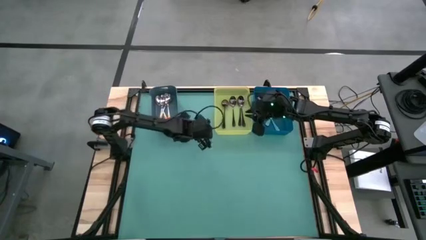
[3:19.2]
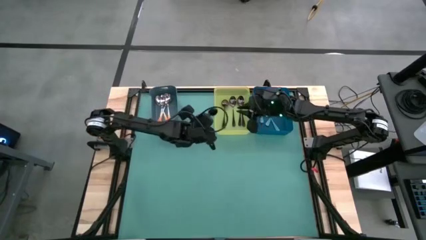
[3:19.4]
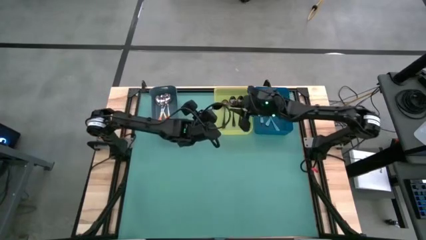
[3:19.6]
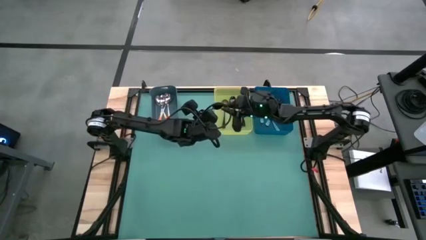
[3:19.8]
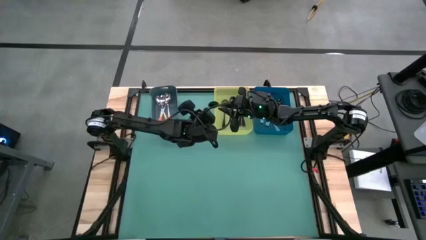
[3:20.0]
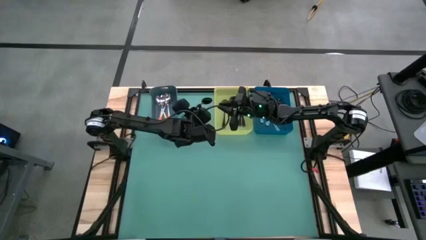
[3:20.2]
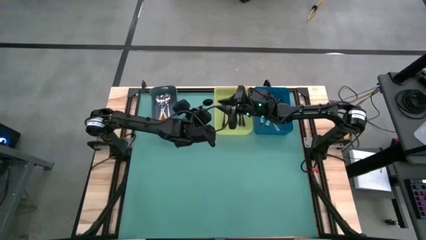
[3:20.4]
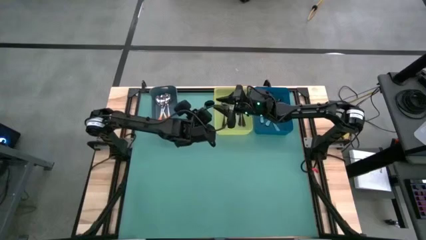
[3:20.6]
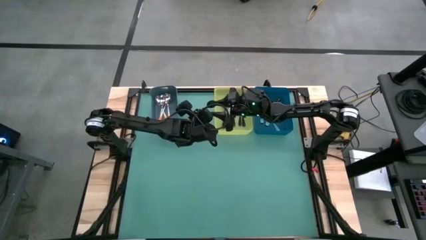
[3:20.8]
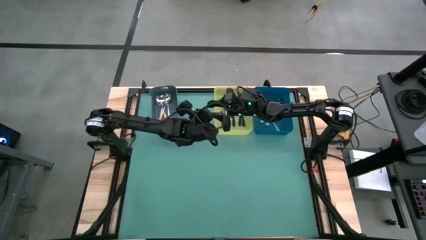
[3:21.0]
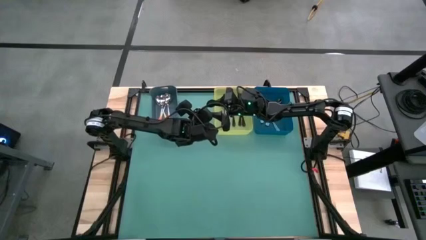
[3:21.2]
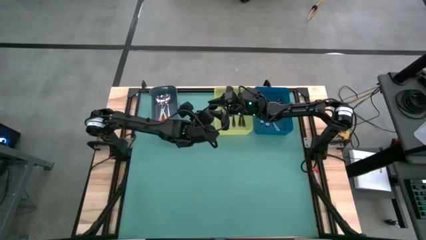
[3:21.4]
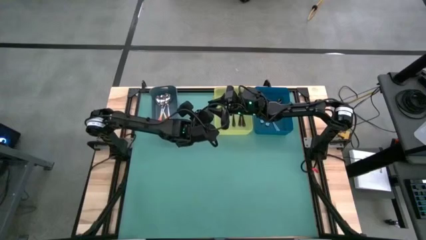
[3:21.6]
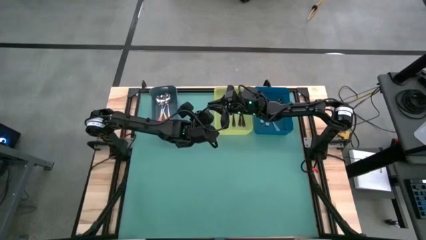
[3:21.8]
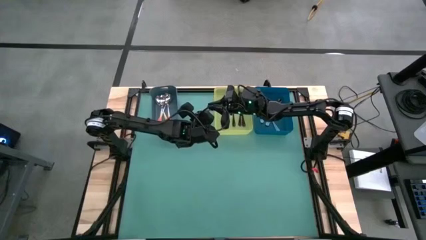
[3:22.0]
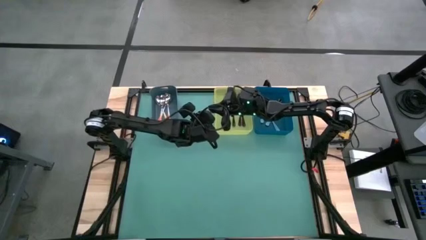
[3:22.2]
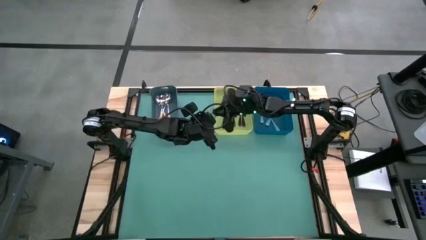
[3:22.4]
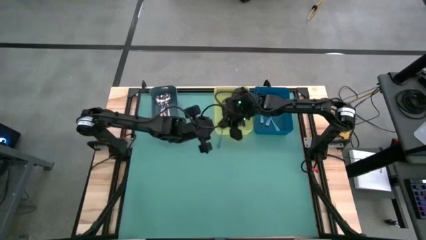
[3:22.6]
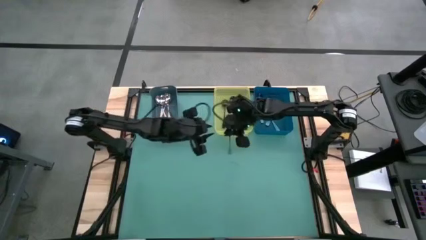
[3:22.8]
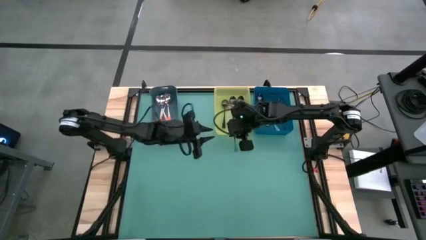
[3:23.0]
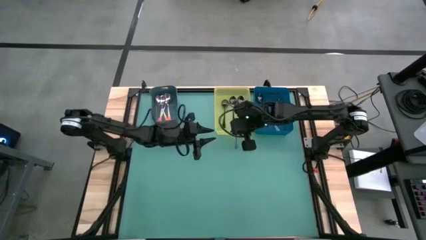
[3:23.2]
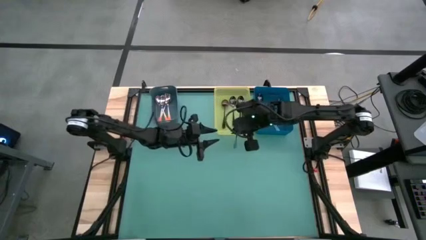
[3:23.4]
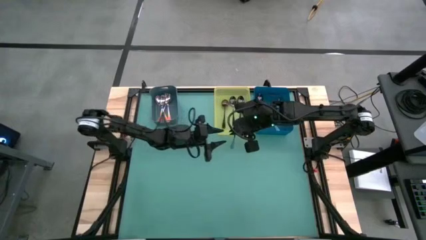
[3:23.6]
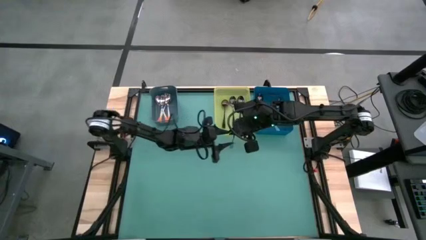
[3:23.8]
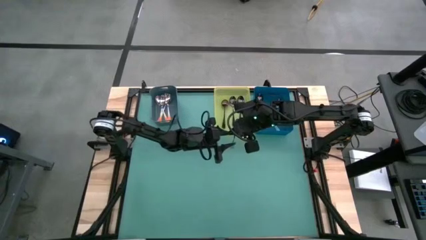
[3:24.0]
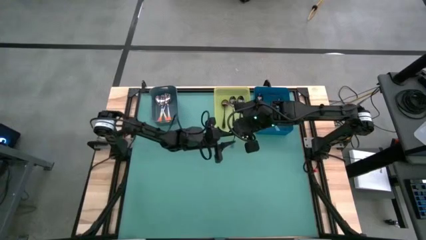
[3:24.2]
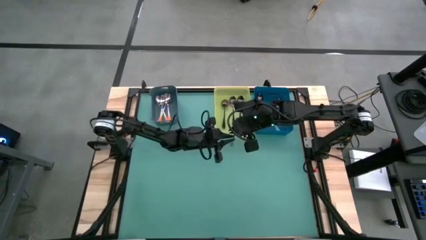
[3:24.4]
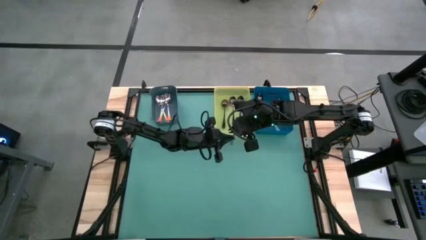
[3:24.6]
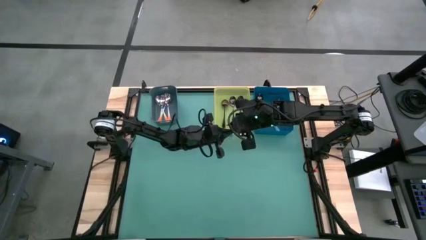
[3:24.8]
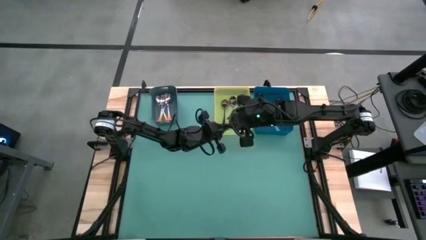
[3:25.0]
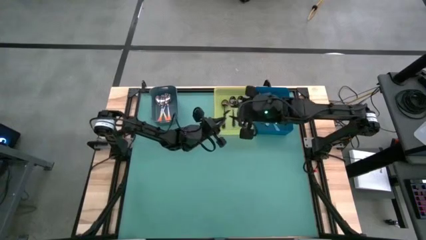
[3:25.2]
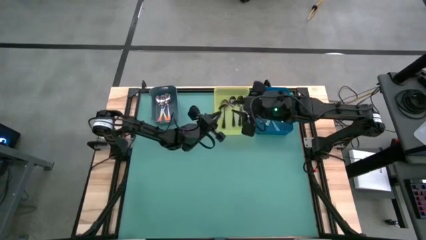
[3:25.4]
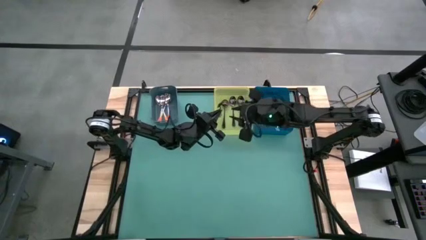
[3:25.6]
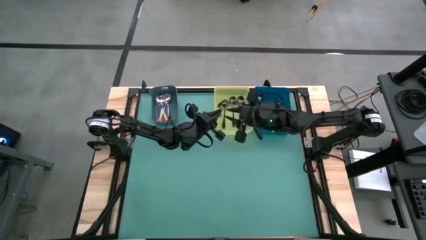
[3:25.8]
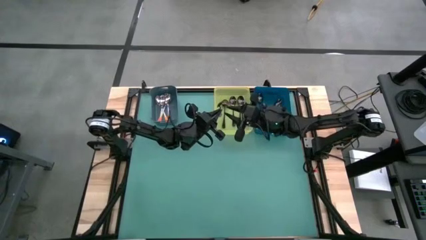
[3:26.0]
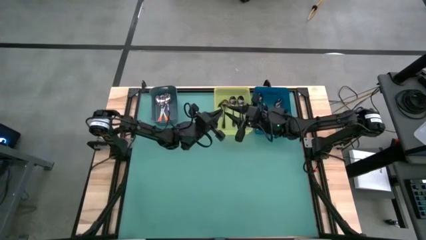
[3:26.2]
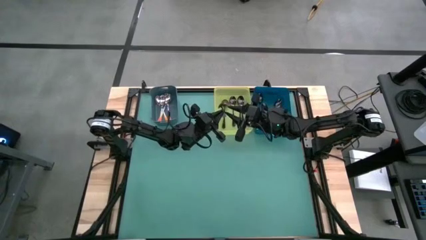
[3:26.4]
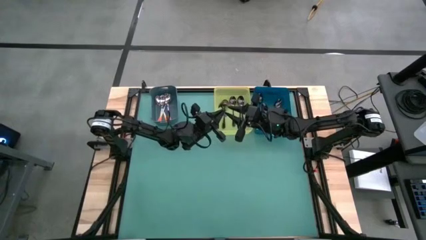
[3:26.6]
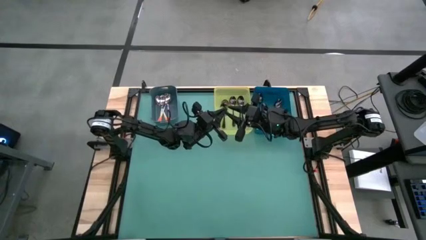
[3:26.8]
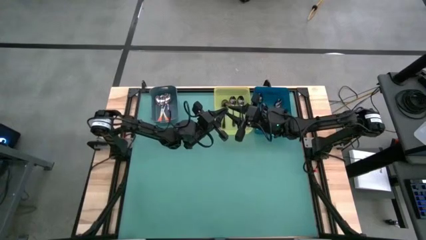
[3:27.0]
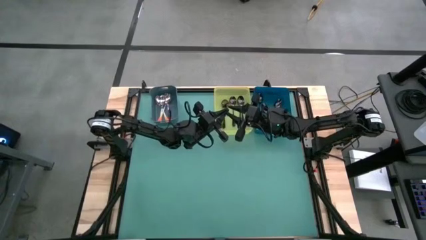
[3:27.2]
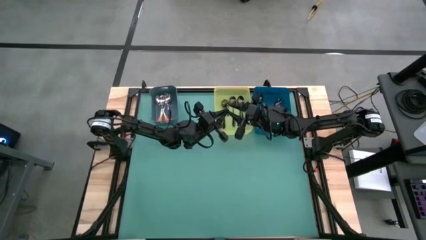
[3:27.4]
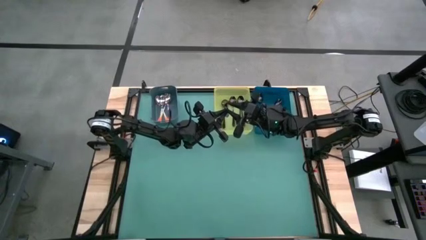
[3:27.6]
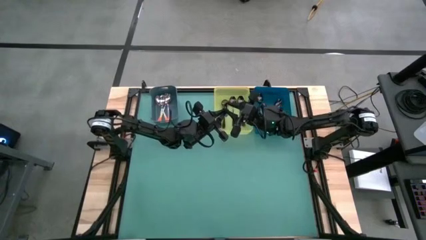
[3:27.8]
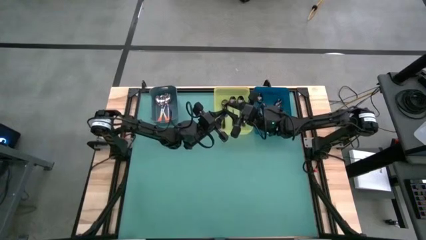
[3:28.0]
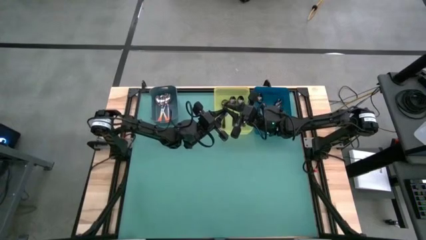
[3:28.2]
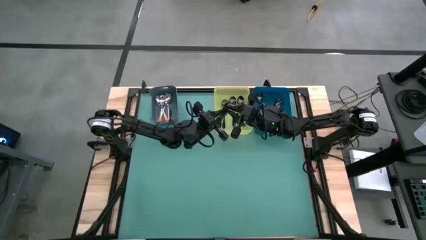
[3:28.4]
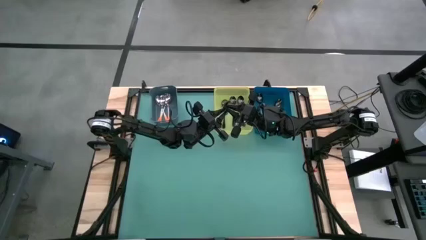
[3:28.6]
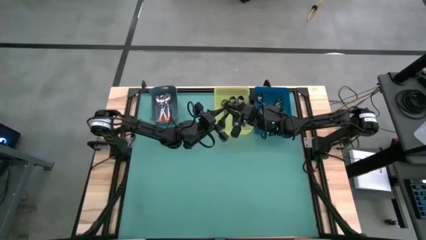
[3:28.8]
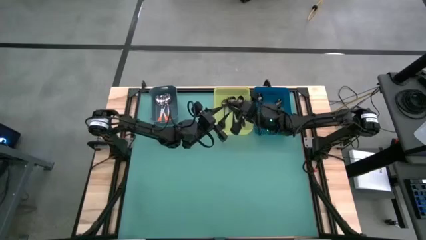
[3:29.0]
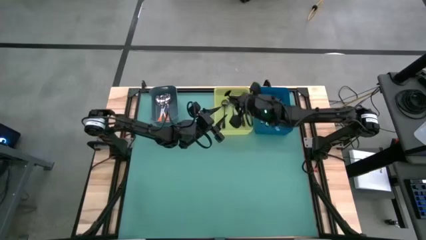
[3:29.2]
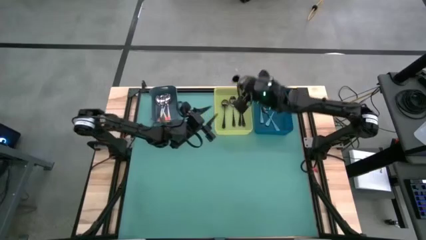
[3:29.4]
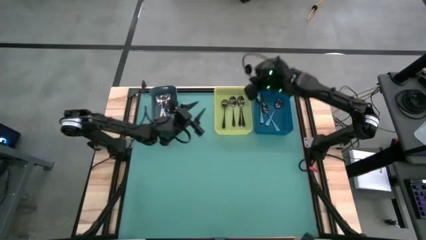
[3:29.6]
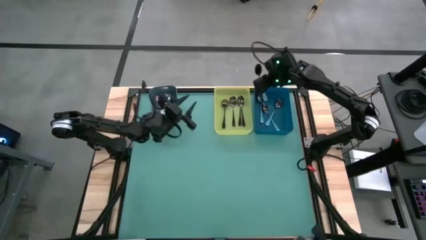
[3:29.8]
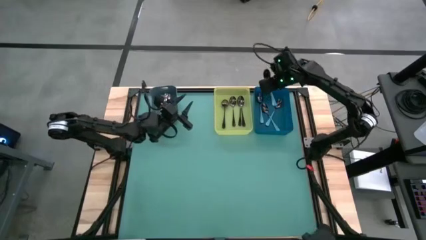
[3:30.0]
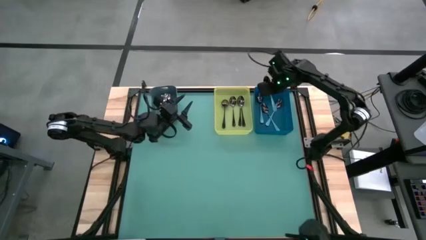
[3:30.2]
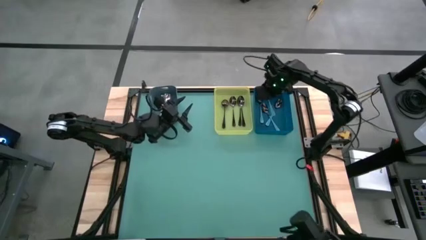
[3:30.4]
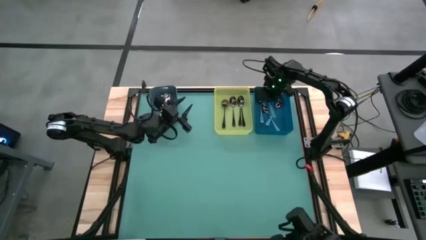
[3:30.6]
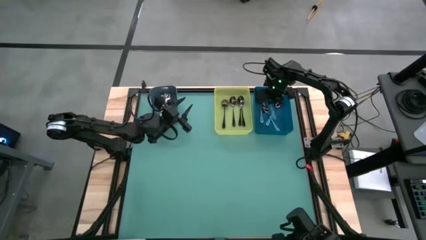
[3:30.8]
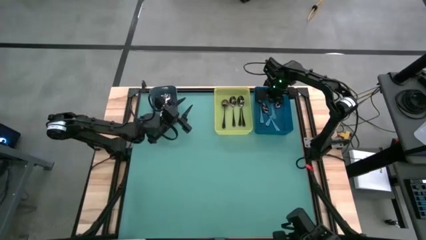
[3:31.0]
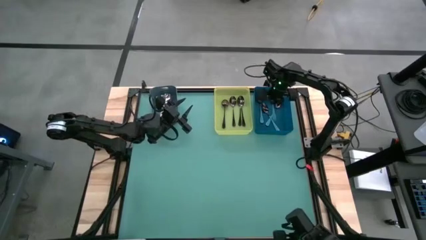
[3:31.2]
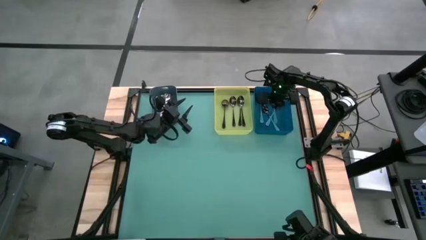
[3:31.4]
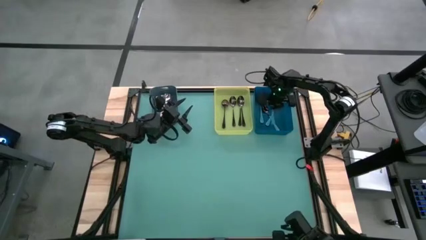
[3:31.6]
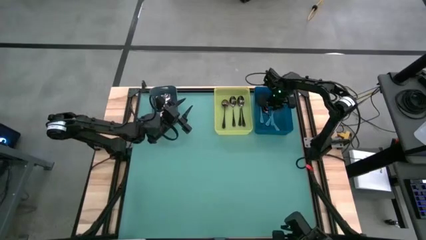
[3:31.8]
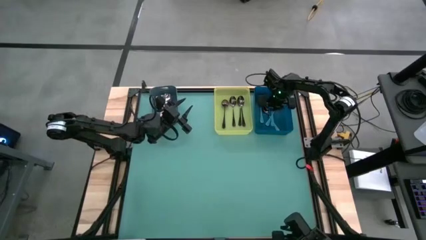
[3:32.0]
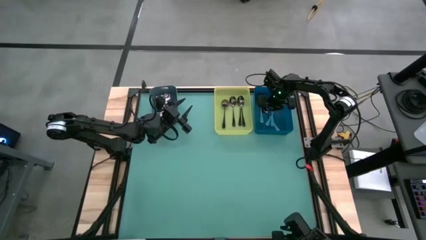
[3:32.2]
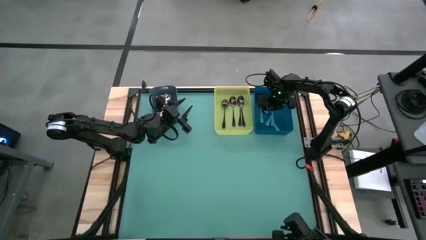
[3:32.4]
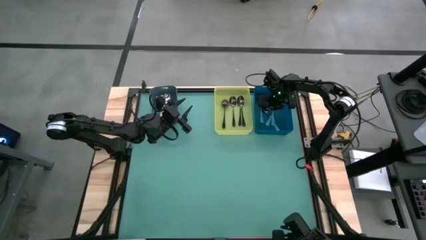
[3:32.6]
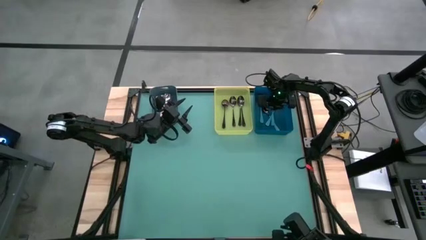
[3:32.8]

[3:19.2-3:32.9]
Task: Sort silverware by color (type)
Put the blue spoon into the blue bin

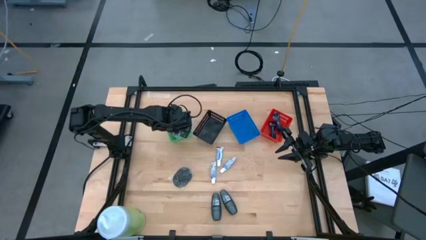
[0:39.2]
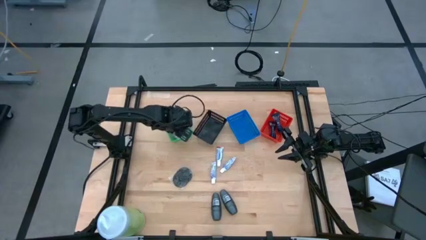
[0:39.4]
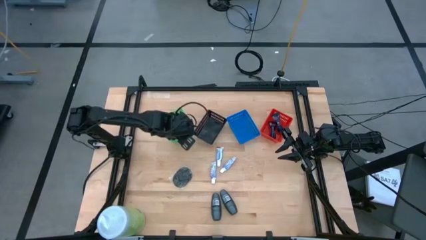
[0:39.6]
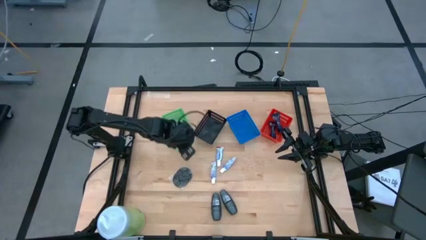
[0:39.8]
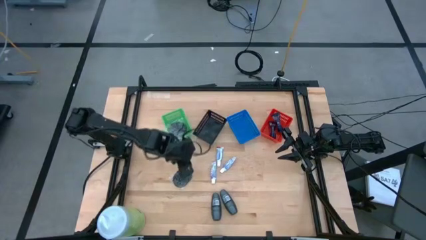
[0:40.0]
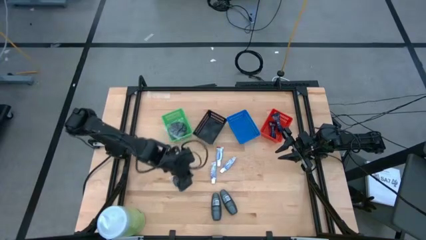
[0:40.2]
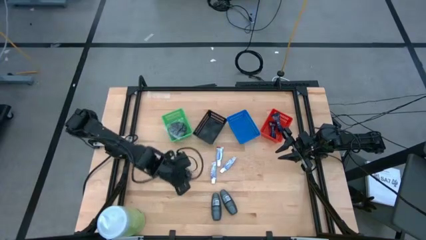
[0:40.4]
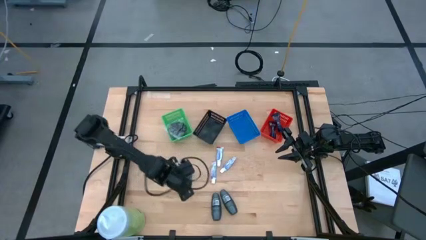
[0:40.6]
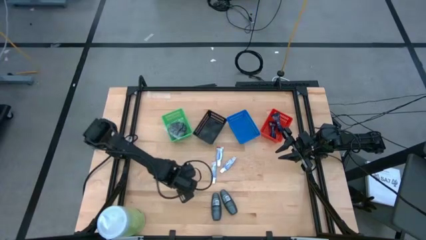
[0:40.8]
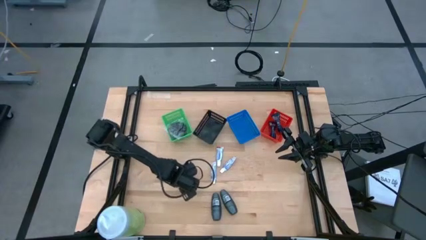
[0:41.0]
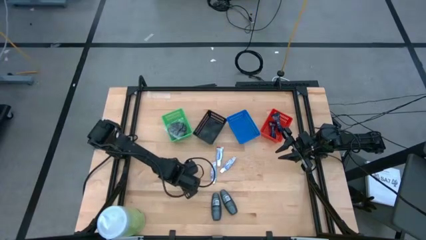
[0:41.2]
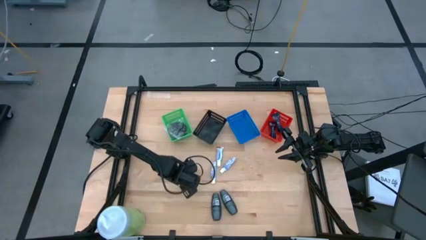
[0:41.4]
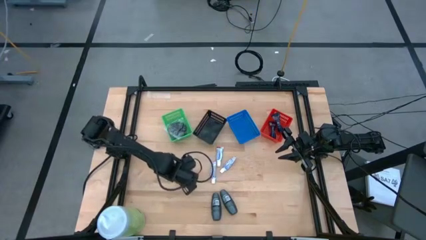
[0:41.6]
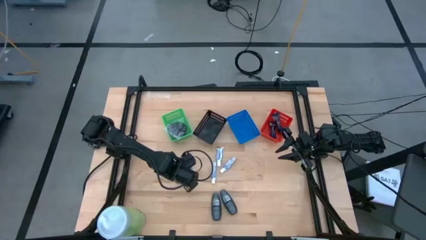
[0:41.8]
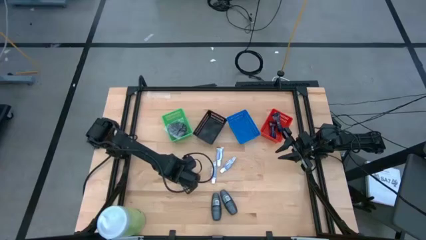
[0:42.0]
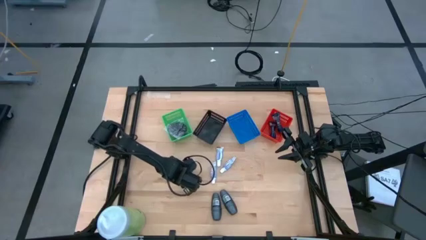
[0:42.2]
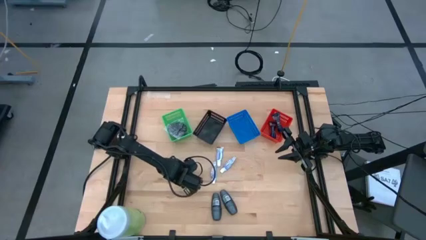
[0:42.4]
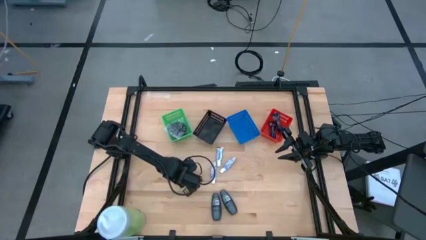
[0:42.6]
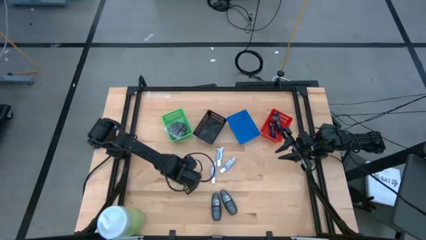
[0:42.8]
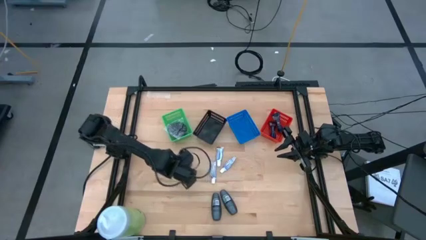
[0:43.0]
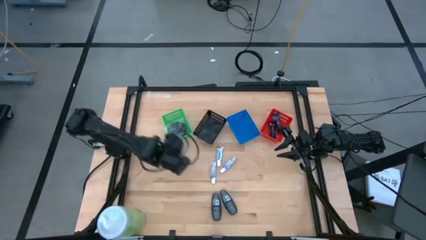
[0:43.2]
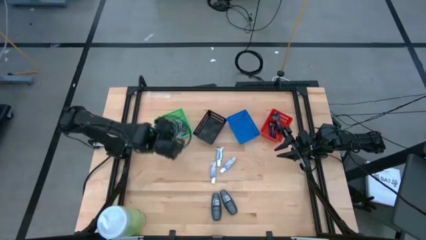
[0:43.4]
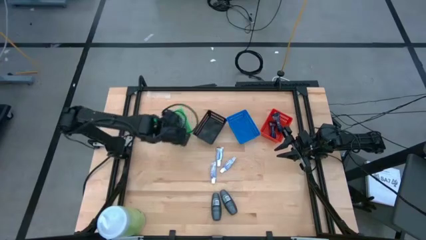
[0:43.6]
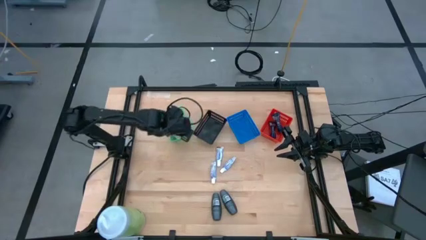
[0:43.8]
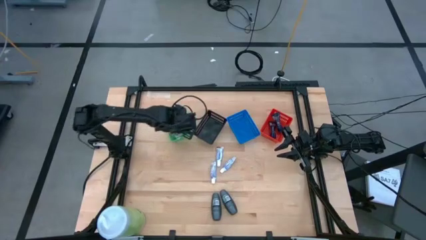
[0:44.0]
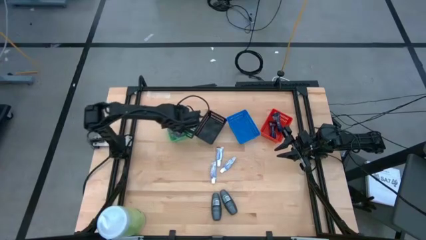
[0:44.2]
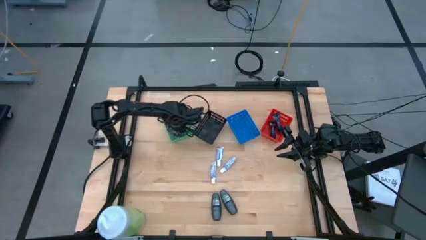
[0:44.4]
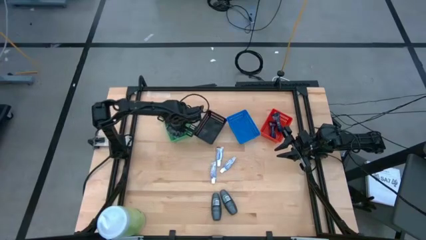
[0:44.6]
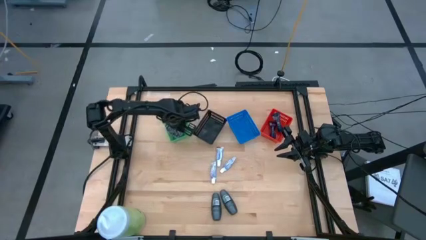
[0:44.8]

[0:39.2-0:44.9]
Task: Pick & Place Travel size toiletries
Put the black hairbrush into the green bin
